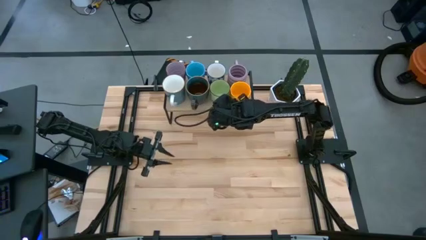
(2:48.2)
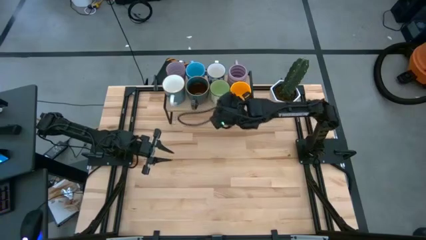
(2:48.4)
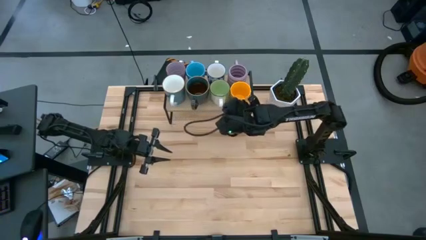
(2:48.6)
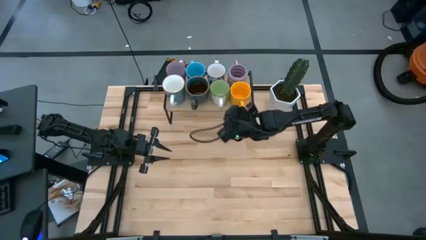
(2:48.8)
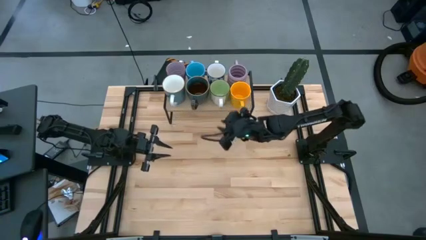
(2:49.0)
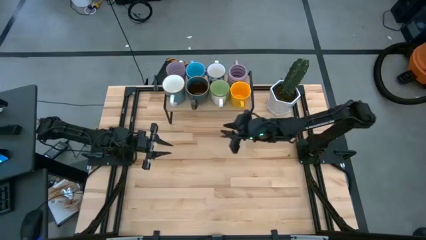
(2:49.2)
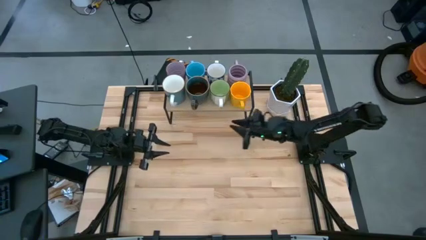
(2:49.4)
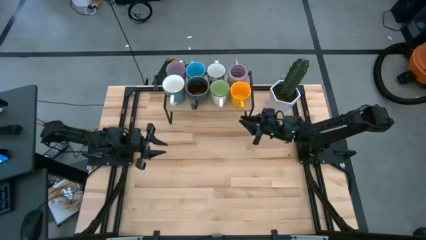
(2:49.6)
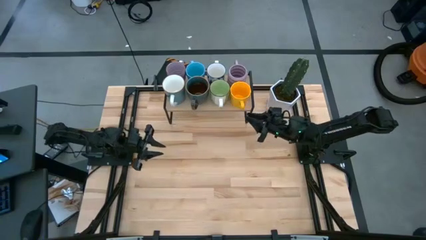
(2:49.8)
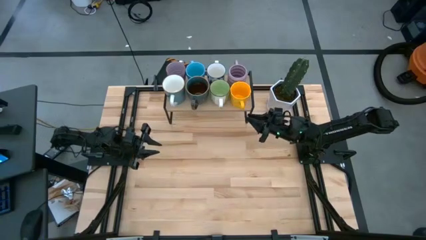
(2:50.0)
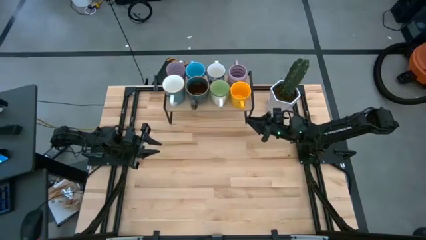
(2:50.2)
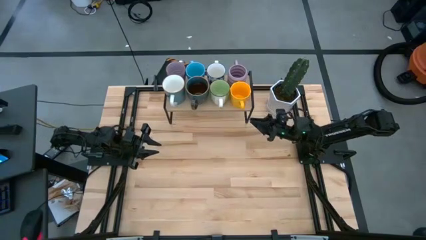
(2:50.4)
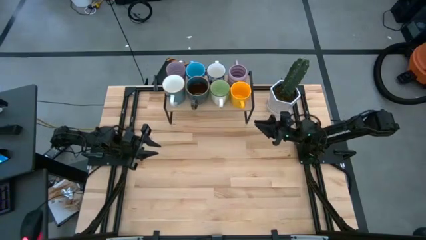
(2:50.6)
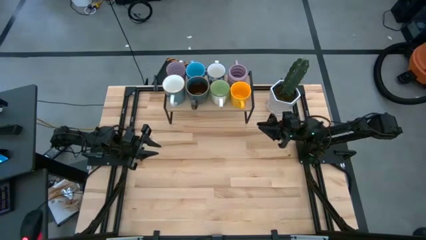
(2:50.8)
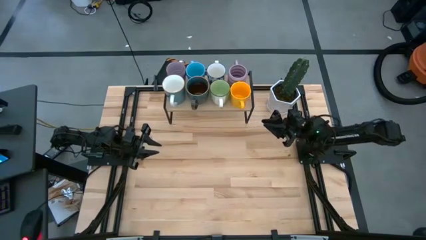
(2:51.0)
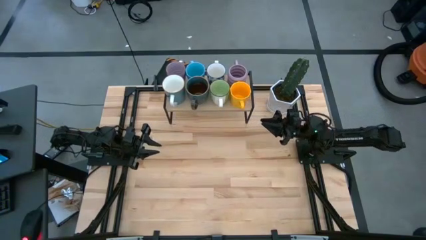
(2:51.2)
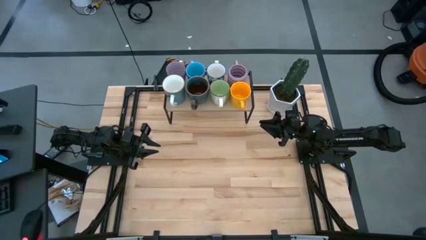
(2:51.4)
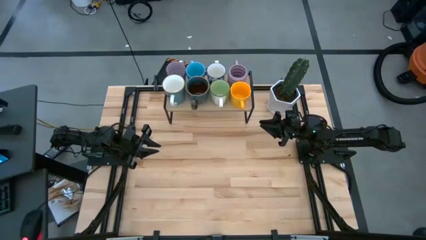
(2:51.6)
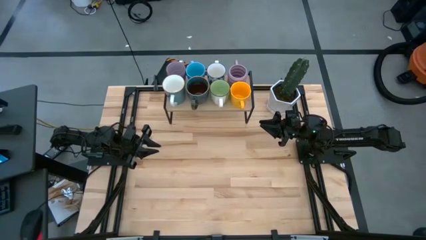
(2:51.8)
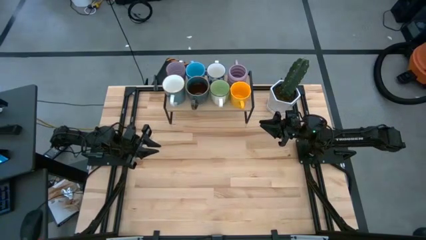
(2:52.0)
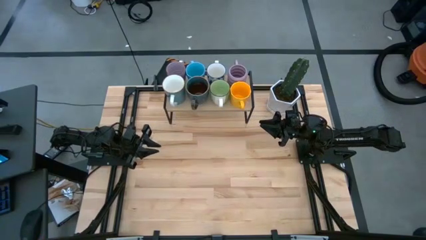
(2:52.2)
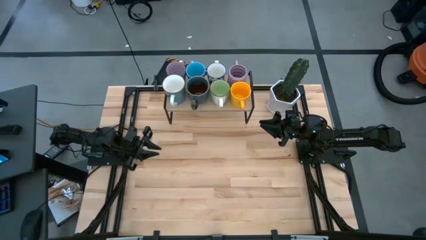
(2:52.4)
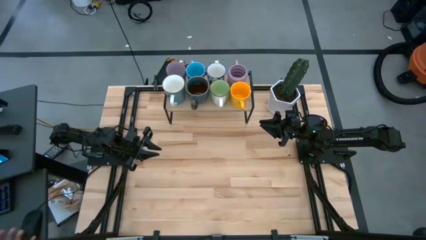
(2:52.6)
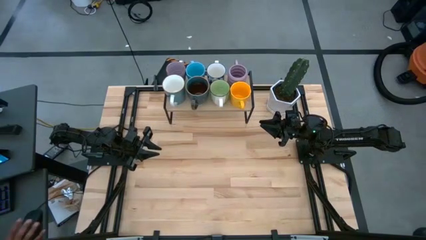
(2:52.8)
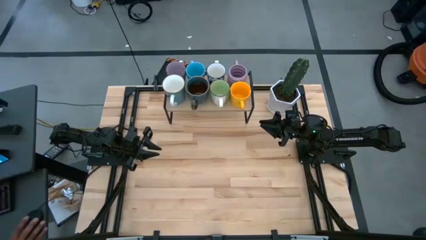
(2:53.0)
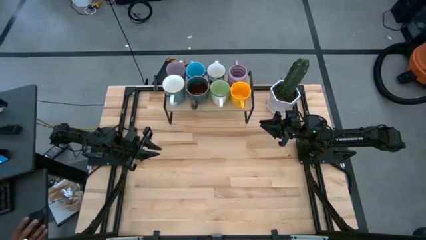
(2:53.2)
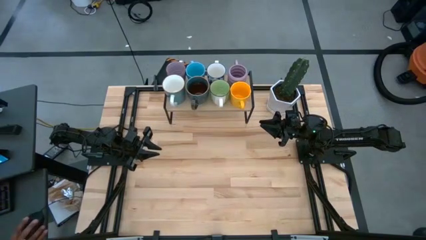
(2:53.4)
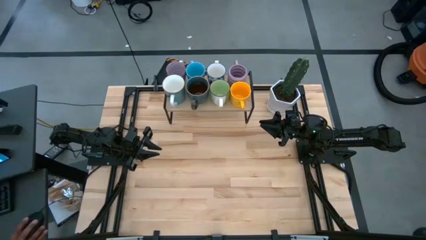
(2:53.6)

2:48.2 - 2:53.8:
Task: Place coffee mugs
Return to Home Position

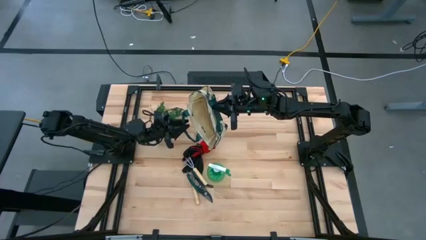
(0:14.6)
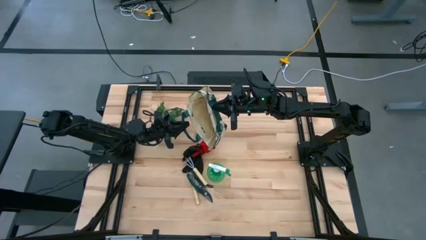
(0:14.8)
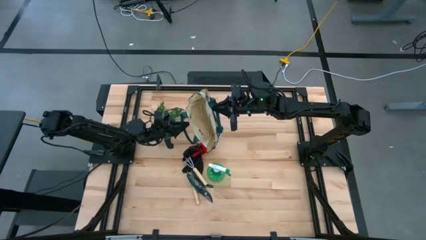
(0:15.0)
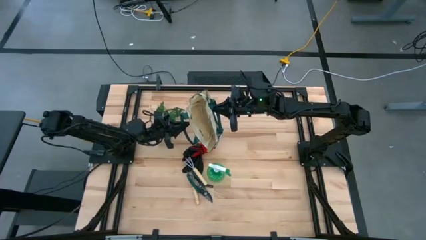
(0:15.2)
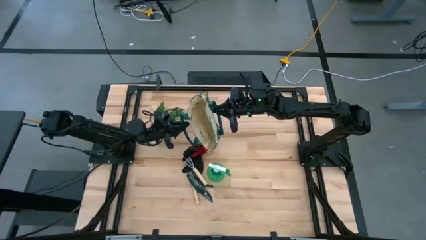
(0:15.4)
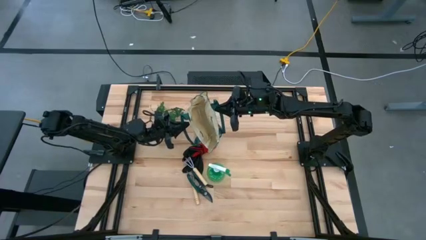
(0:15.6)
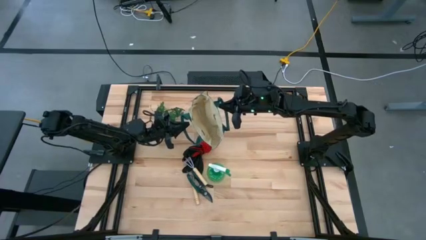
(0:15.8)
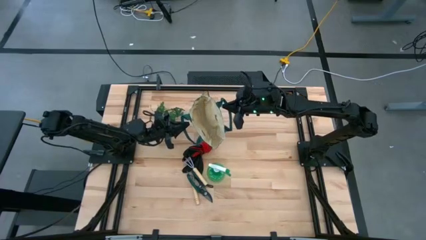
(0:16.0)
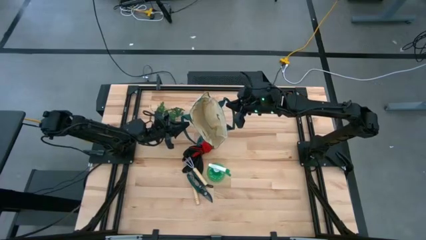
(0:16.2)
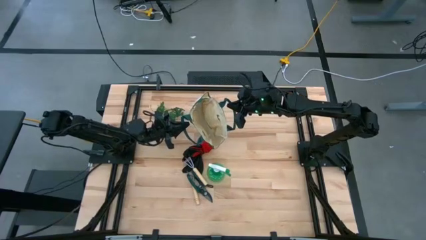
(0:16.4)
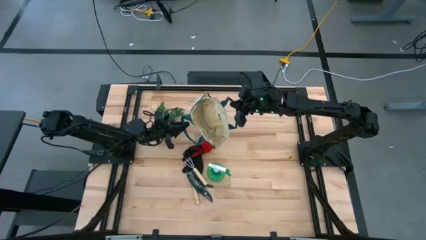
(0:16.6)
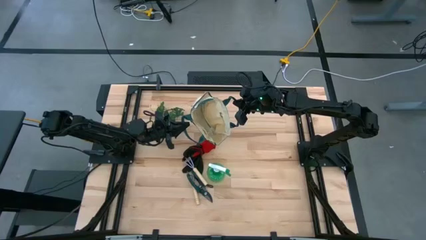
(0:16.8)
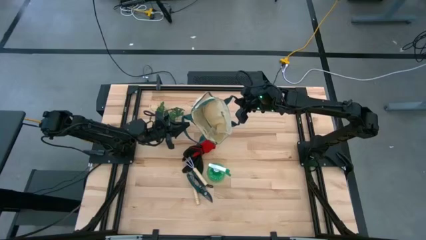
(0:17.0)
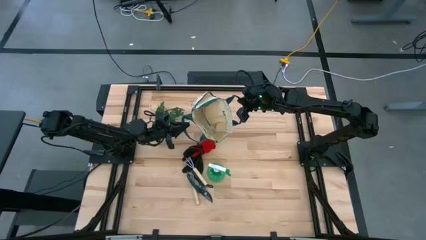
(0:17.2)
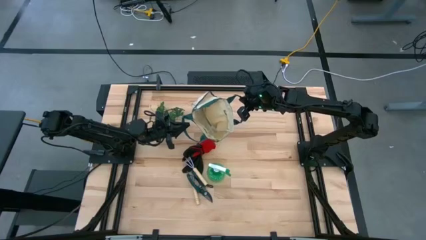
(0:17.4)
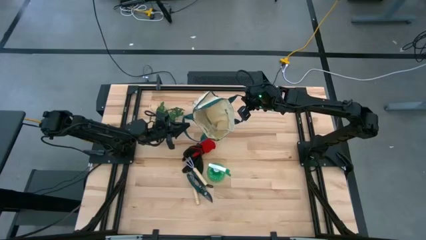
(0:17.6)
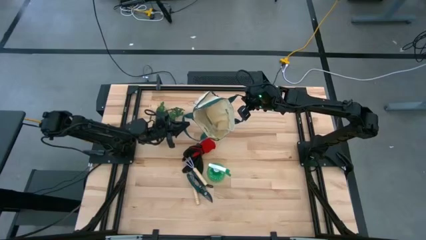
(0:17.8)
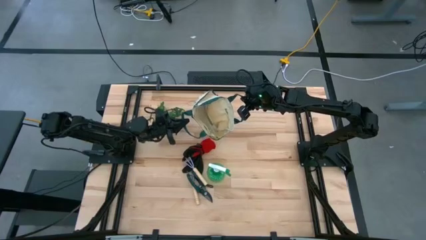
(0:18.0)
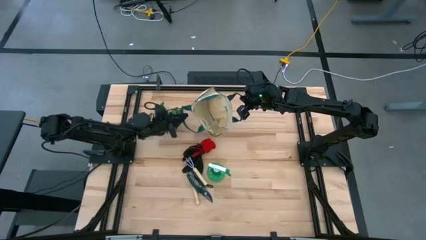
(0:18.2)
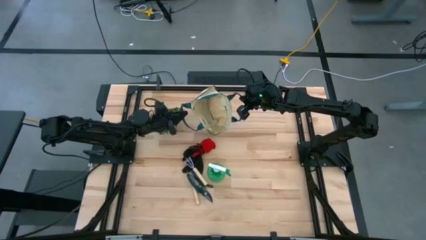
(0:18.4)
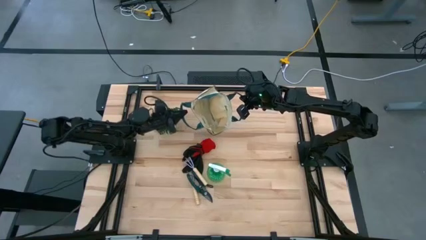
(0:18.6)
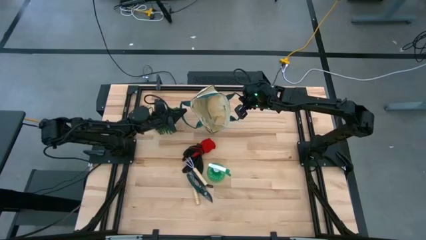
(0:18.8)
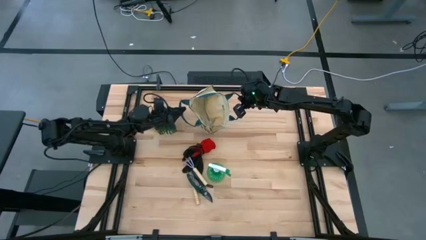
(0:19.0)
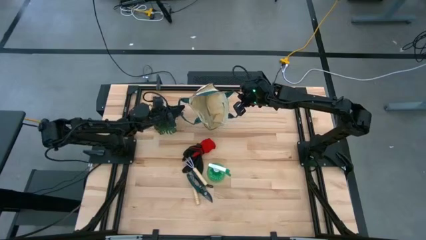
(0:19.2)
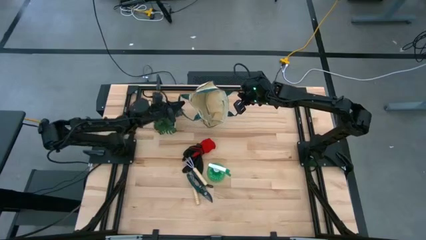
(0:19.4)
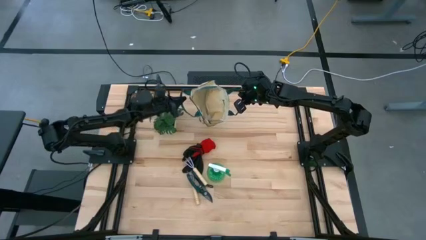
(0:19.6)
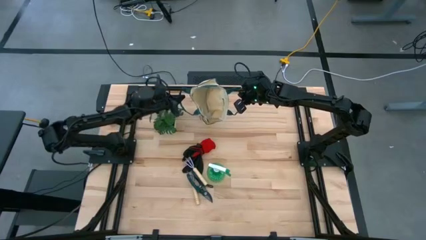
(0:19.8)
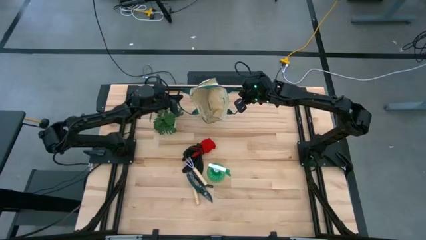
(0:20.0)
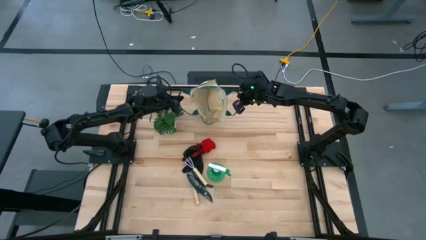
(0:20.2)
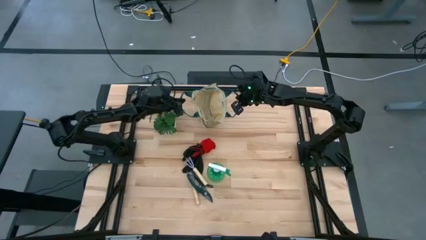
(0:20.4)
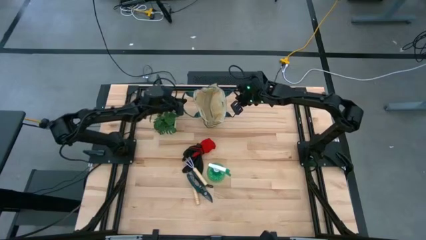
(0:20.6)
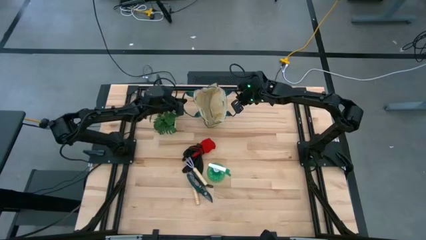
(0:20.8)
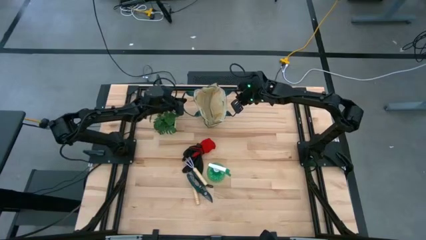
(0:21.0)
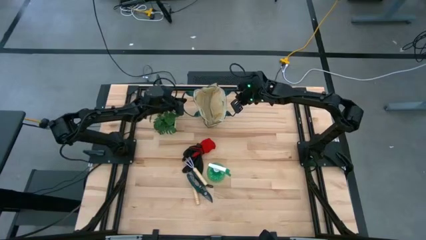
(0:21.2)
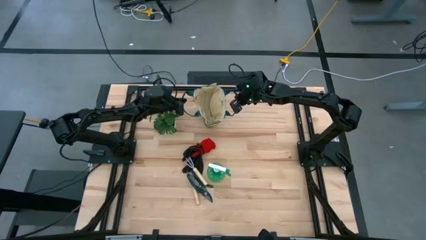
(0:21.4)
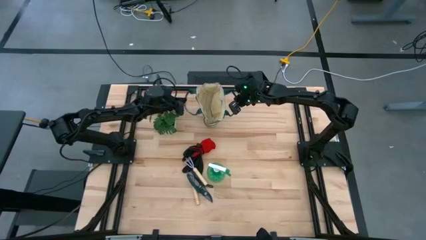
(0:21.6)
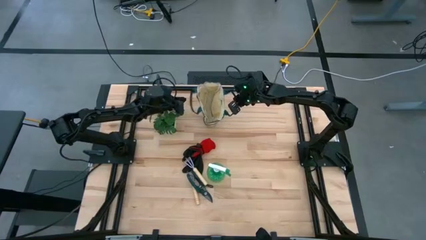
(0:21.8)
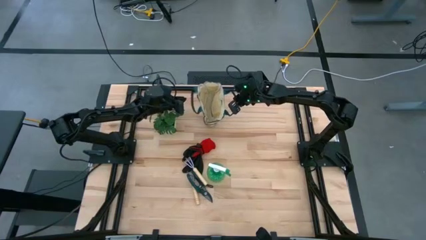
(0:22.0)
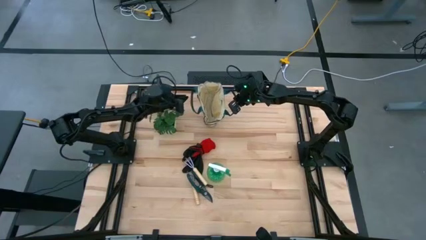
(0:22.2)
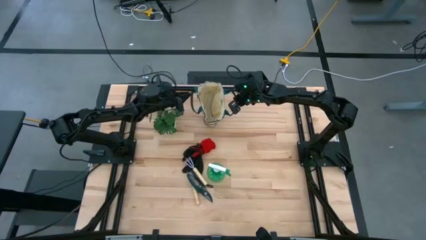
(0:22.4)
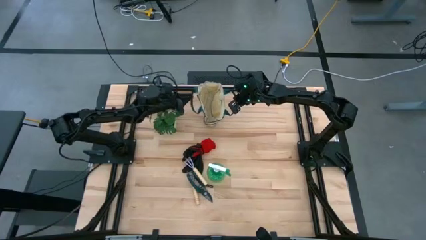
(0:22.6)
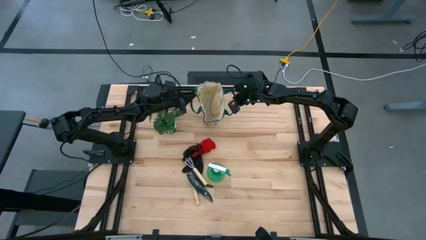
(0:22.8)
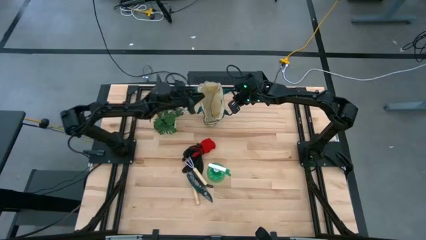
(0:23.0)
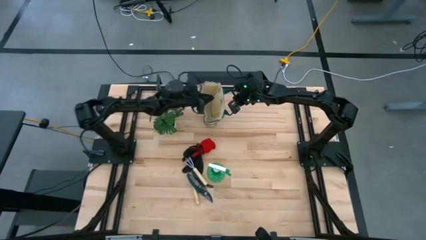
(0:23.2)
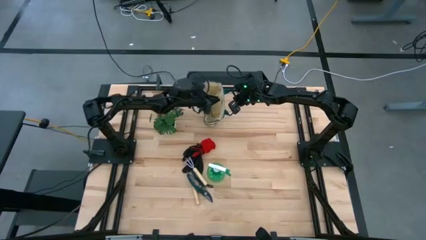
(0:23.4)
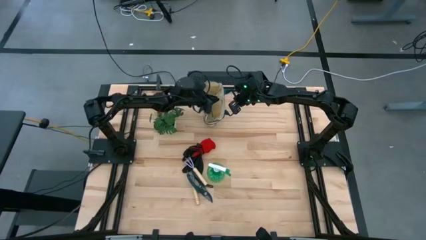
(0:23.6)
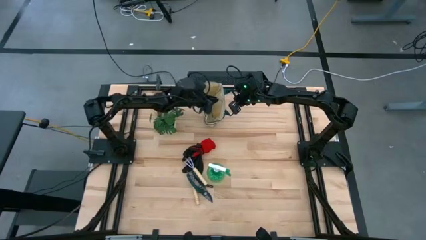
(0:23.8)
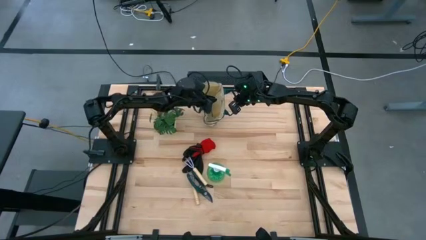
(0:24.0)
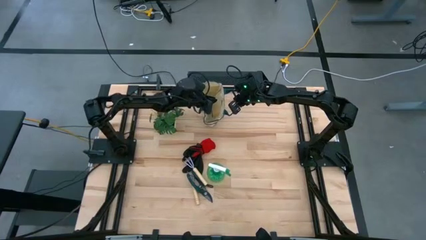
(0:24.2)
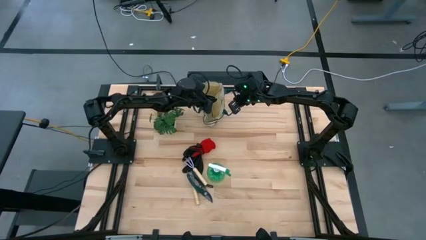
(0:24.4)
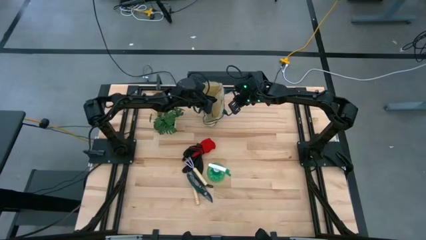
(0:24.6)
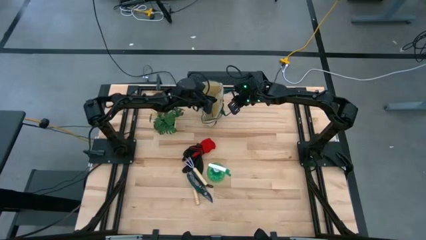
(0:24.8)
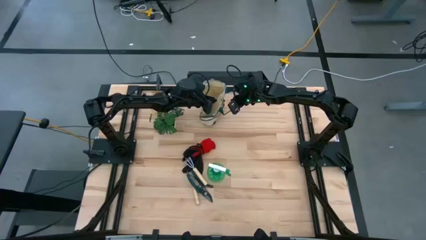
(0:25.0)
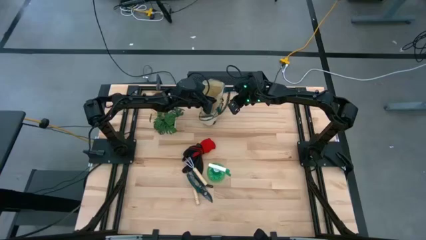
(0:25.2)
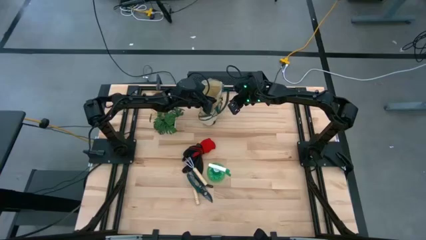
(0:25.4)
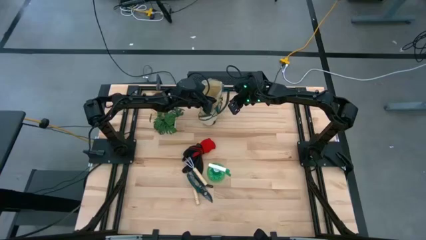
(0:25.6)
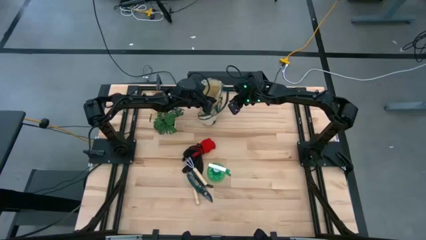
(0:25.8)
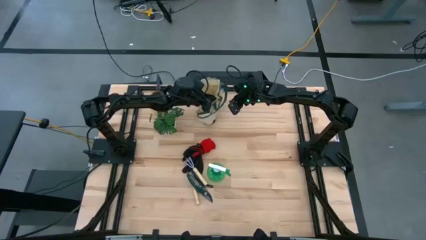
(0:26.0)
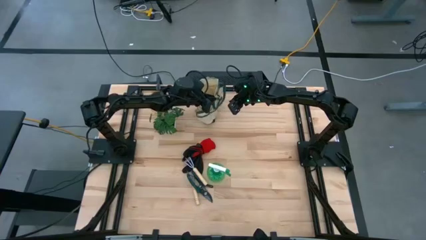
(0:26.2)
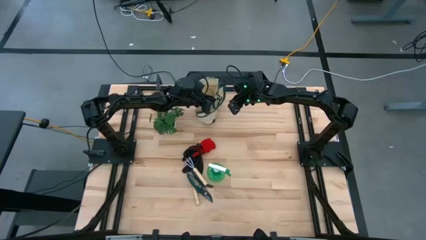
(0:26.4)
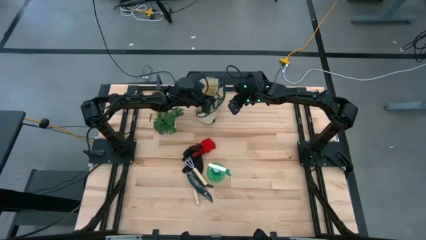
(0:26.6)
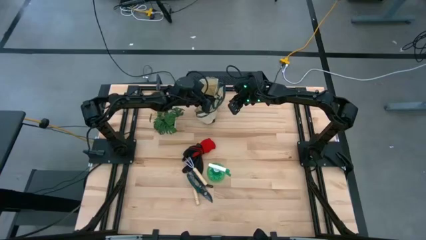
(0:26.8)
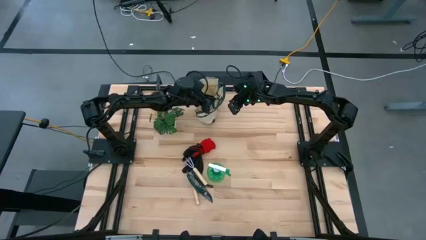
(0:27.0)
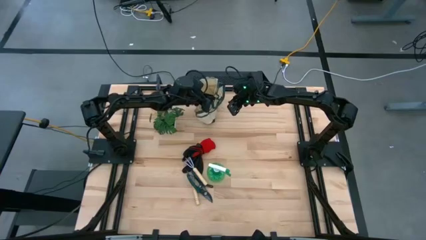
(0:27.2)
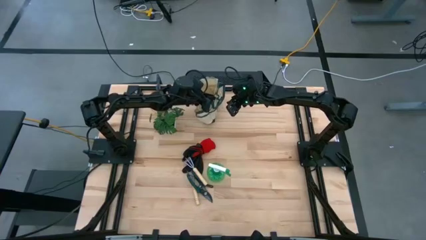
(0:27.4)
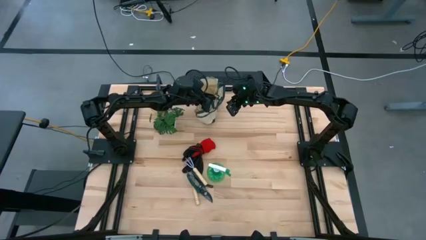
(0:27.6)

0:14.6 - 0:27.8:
Task: Pick & Place Garden tools in Gardening bag
Prepare the white gardening bag on the table
